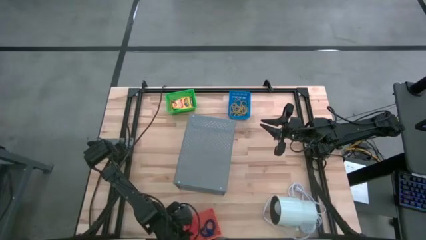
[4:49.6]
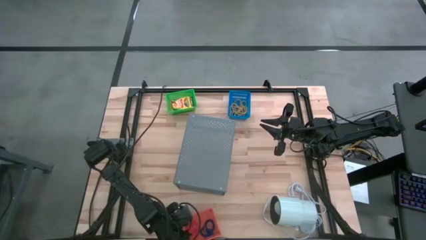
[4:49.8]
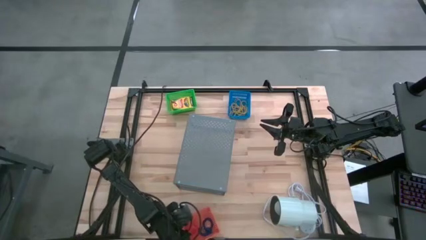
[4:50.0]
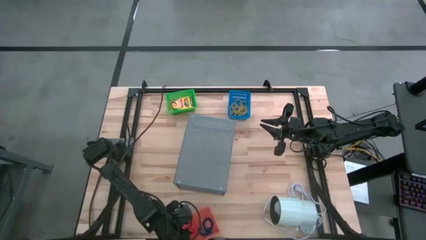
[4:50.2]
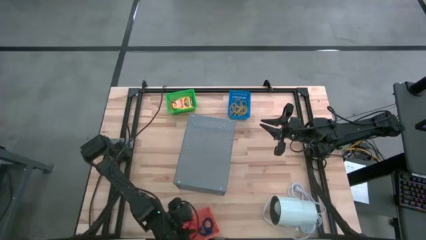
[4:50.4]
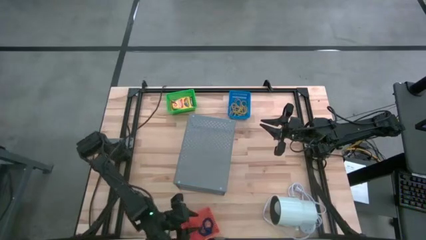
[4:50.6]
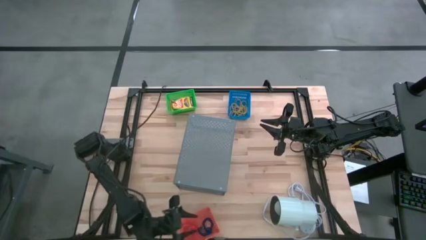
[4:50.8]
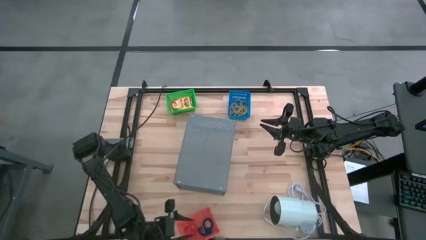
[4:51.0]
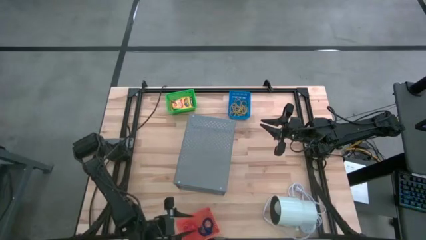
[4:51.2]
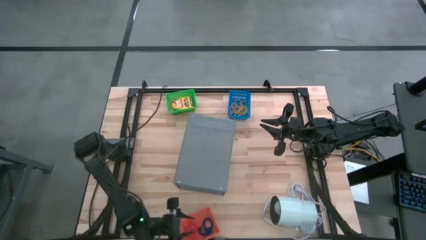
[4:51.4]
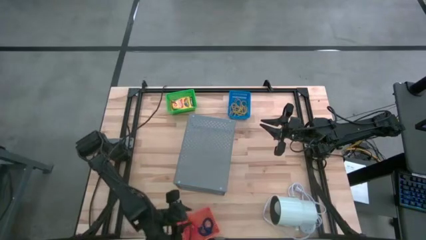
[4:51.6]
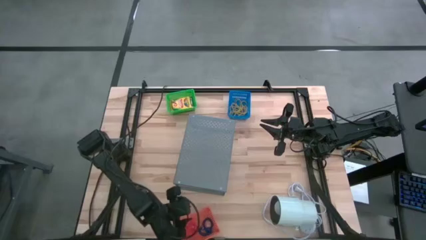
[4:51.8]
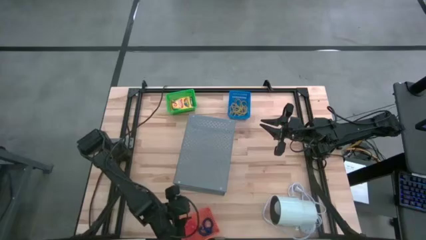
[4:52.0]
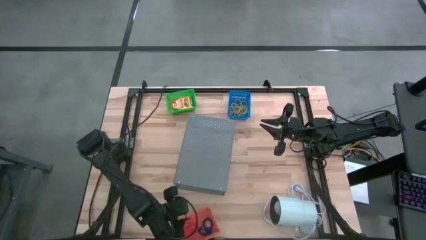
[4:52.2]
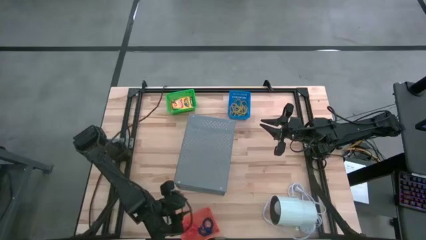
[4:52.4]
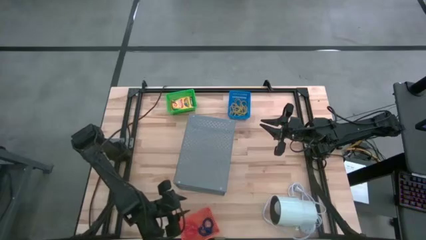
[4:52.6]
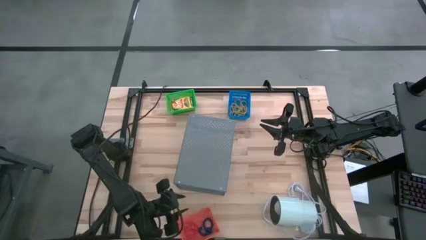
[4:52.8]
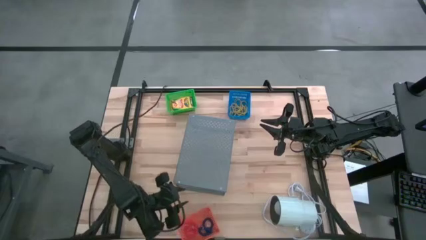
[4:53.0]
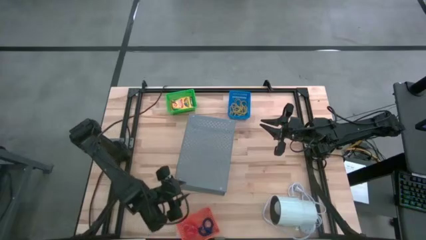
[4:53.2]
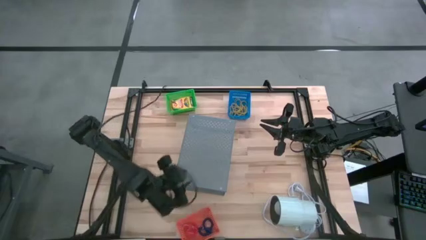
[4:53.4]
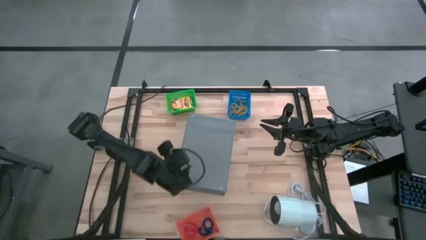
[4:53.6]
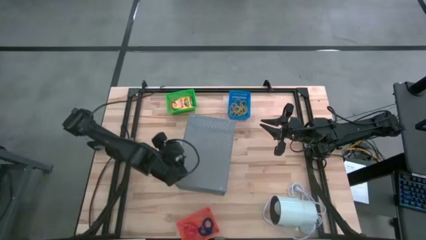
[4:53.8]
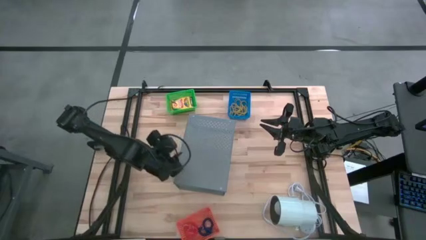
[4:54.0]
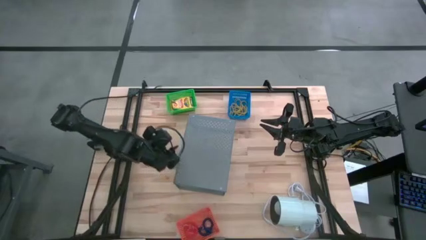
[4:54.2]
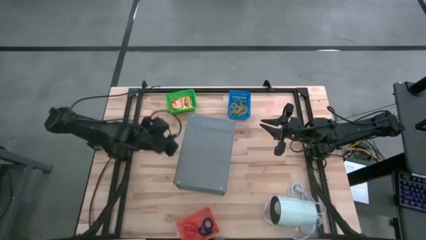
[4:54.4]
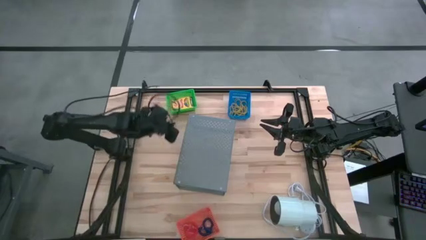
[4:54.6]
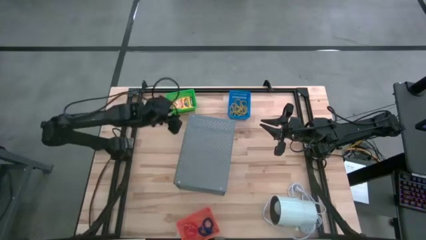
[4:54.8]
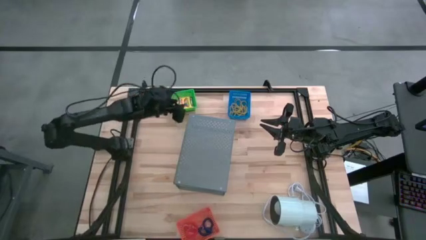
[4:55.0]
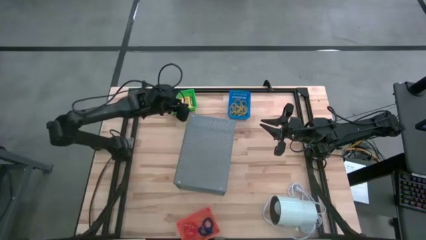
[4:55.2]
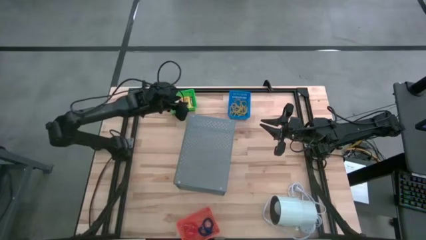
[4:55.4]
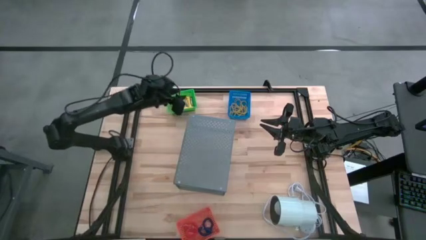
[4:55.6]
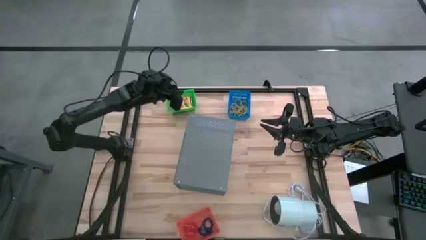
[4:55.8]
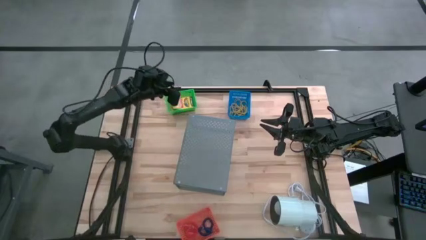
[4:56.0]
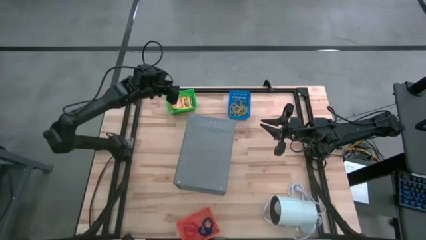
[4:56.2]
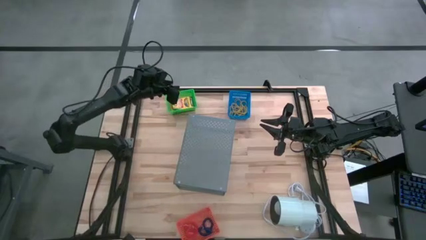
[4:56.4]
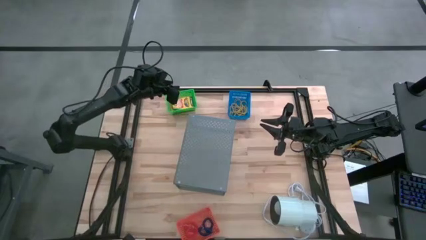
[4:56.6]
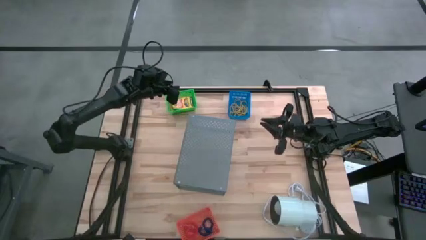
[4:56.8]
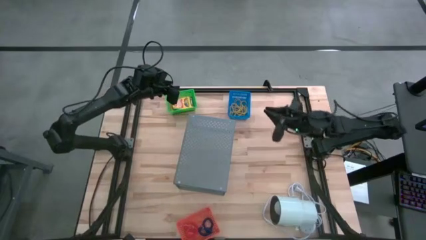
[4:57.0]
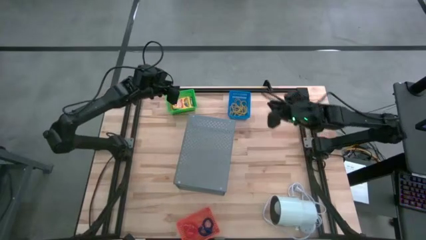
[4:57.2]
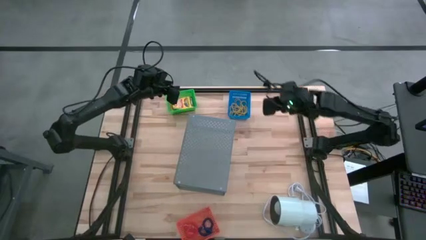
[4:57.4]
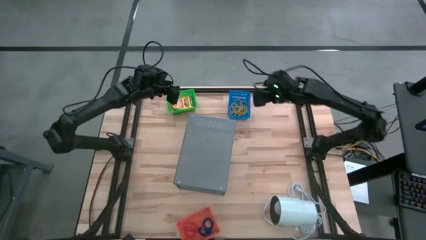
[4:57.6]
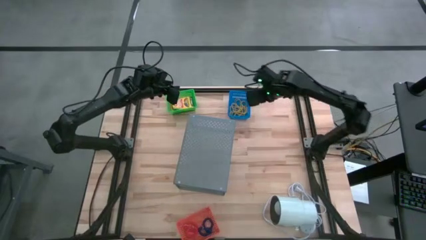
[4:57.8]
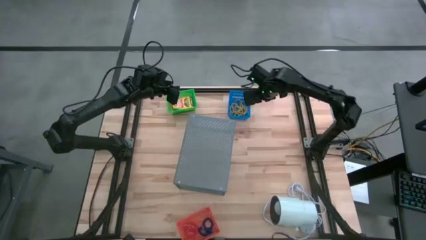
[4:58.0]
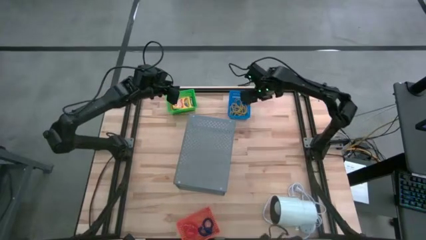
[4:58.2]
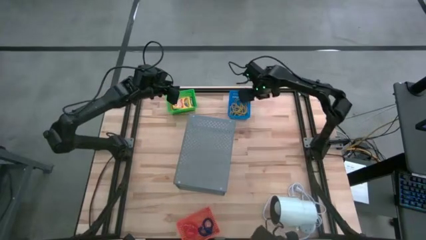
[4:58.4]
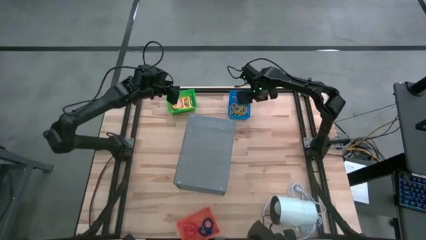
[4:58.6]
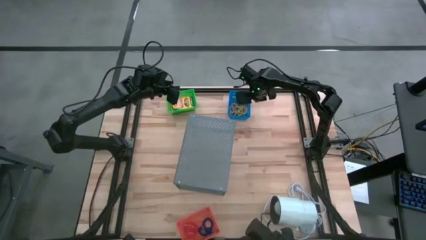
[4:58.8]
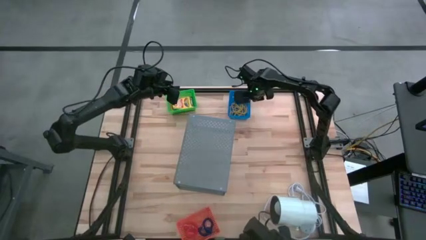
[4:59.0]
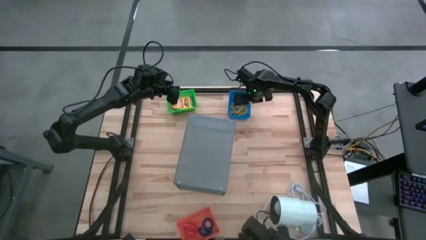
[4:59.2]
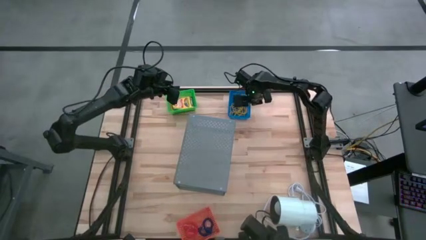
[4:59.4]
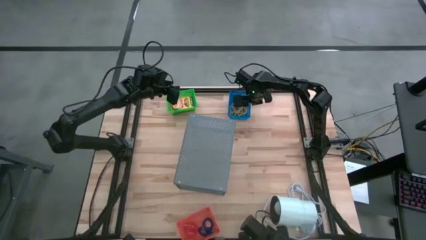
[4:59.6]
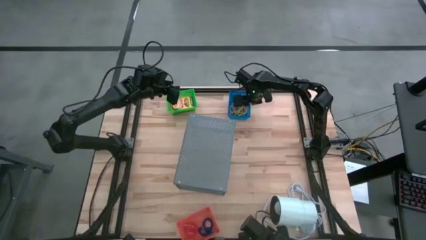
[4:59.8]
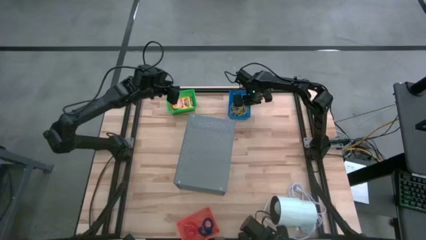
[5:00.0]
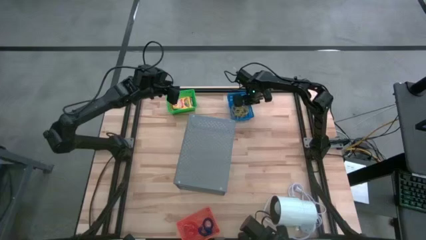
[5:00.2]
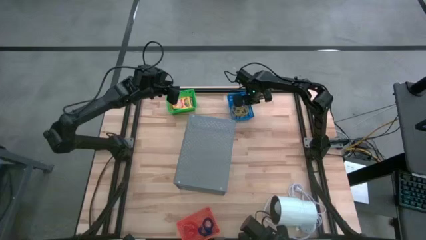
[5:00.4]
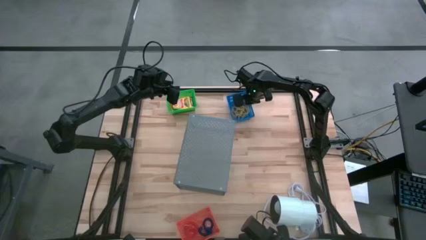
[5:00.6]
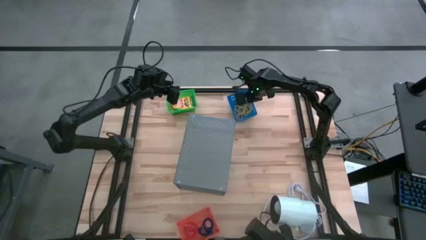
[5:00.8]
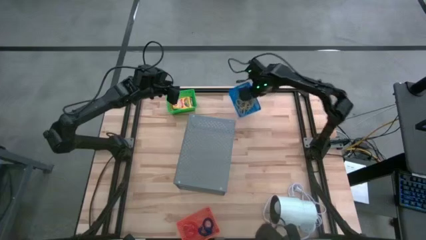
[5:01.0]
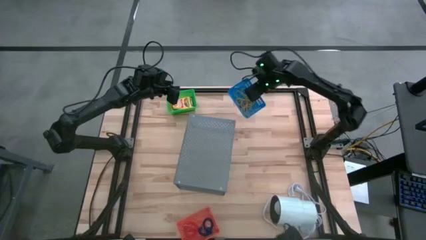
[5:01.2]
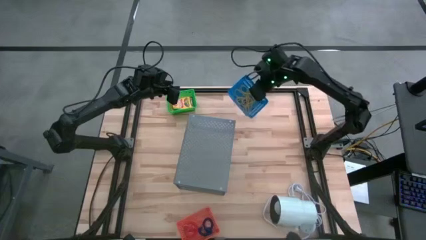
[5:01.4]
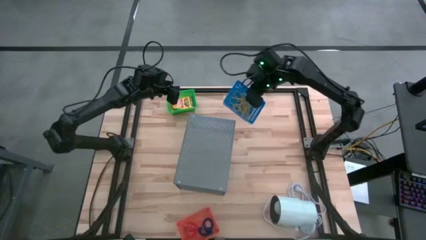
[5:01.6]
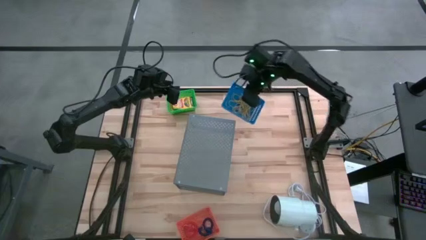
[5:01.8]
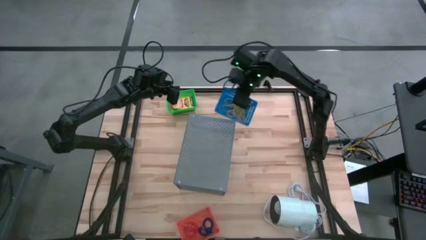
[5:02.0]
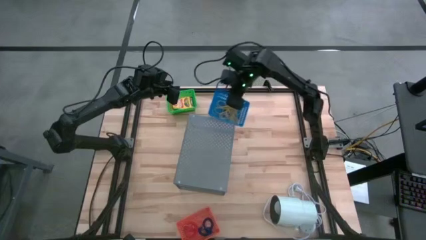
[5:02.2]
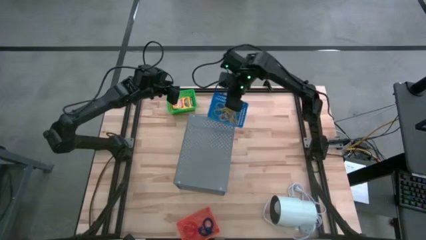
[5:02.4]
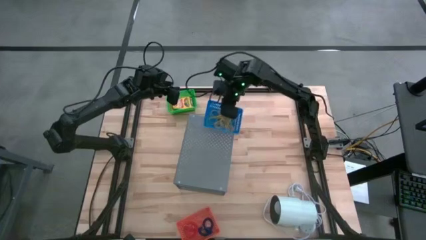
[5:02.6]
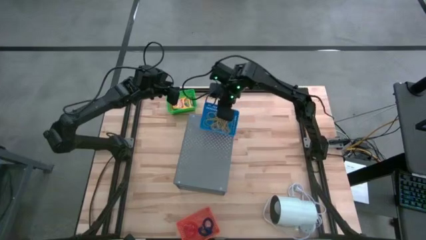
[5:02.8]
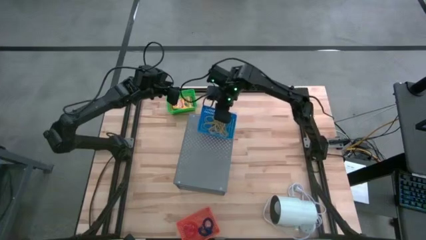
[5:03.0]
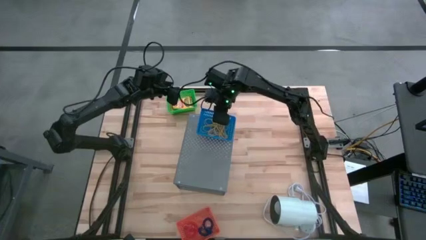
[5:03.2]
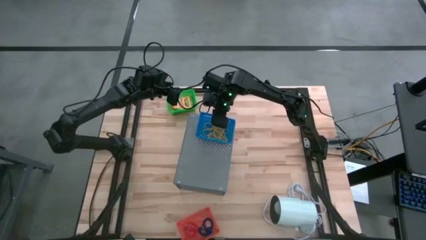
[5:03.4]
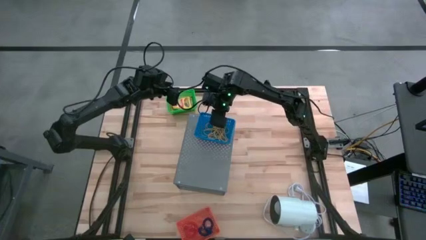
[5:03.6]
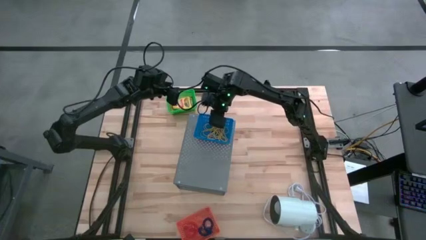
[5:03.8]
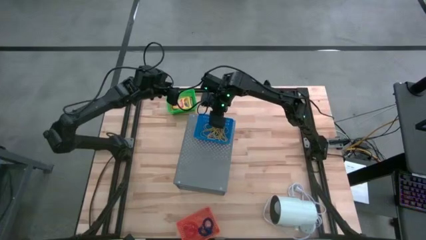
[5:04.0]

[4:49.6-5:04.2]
Task: Pick & Place Office Desk Supplies
Put the blue basket on the shelf

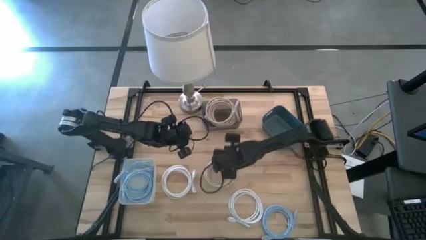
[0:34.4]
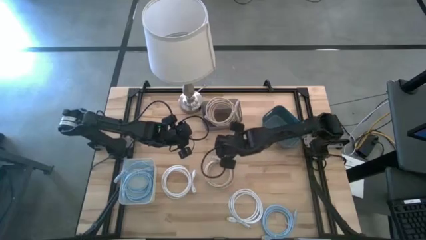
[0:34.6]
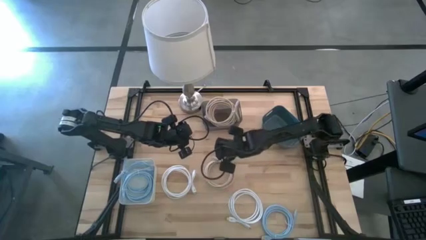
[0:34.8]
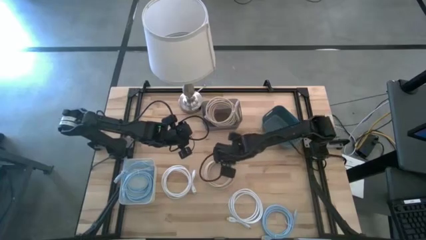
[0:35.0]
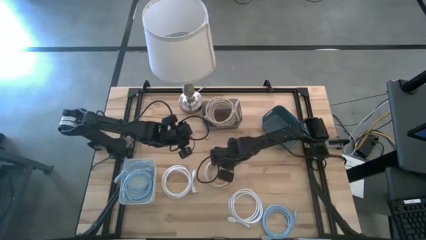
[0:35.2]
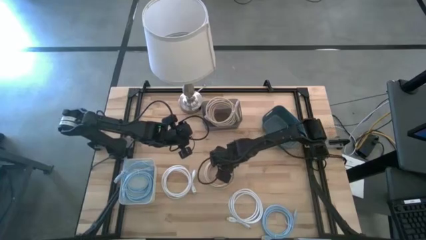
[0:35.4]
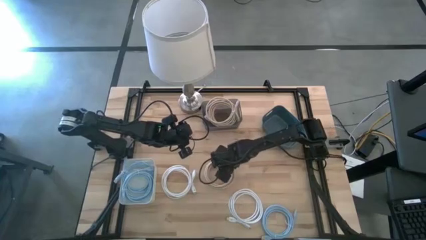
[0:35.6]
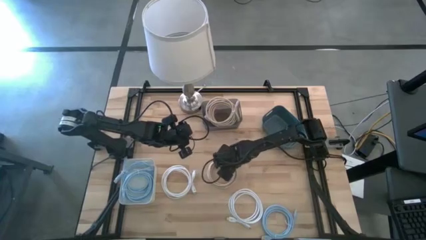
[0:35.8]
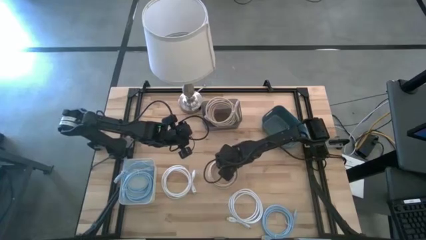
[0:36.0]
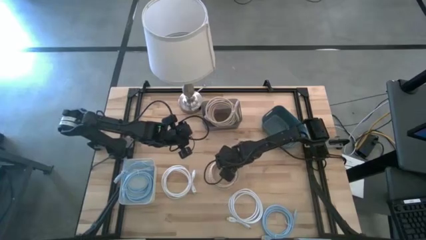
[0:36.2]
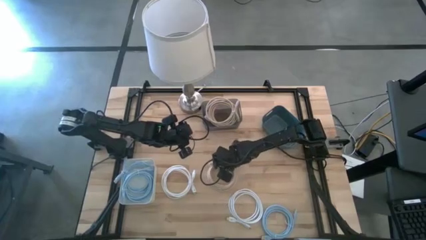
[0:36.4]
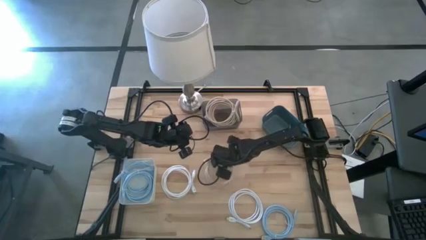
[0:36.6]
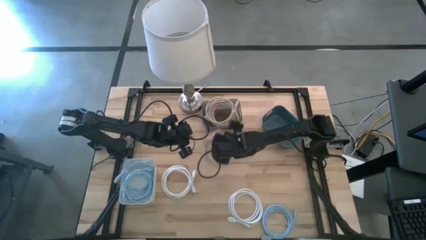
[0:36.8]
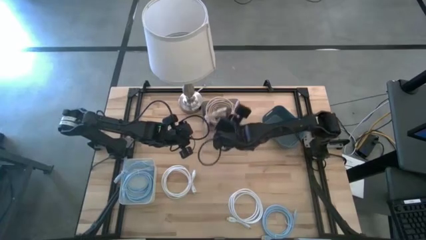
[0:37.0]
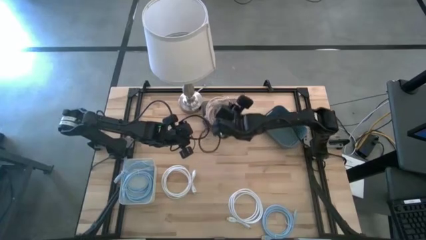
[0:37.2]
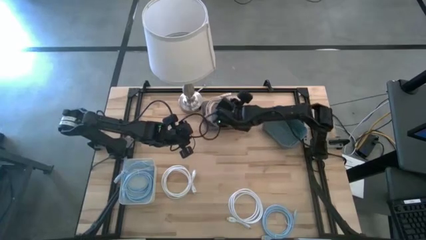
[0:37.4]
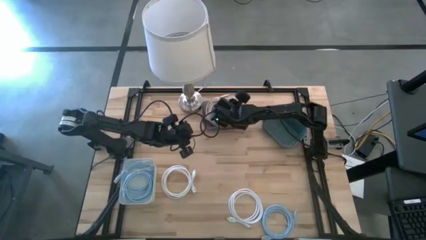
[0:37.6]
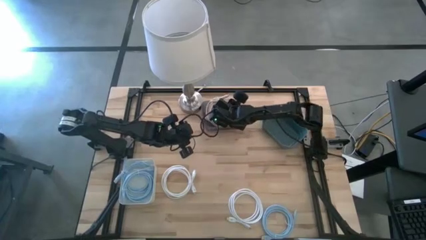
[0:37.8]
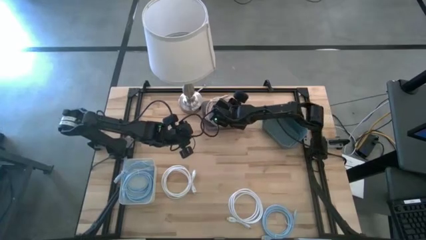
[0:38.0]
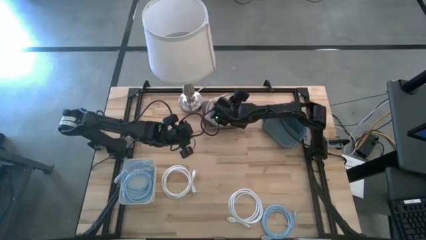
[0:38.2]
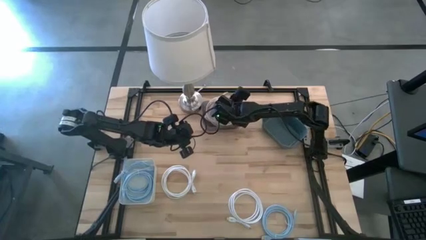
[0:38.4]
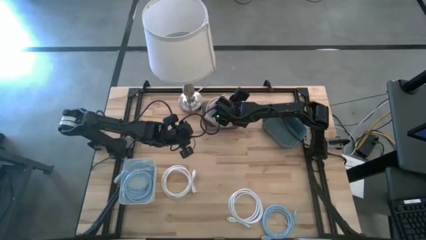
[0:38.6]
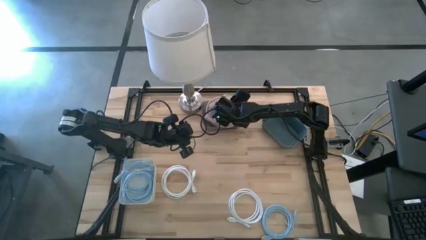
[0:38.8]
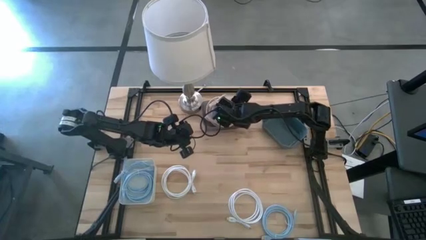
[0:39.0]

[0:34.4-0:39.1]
Task: Sort HDMI cables
Put the light brown HDMI cable into the black bin
